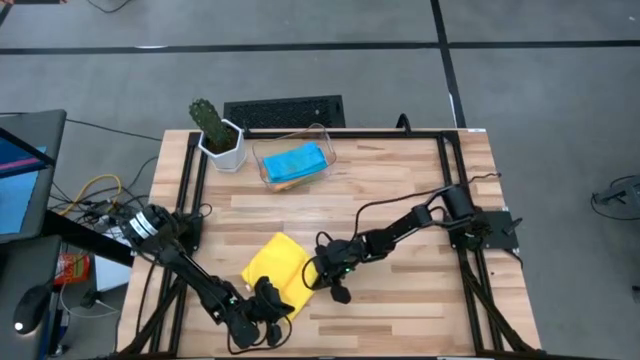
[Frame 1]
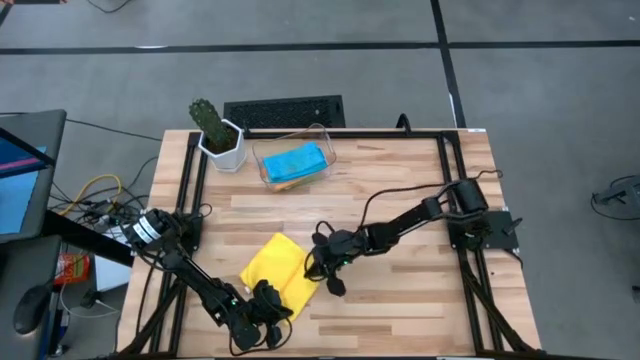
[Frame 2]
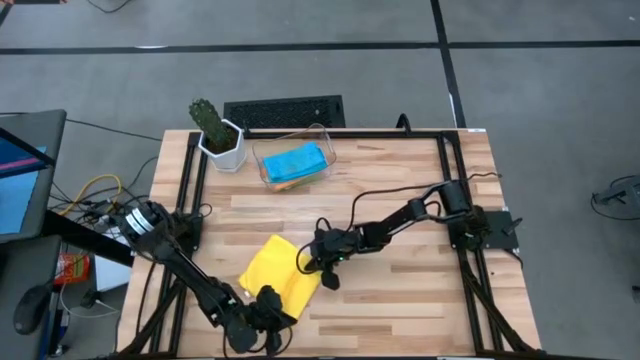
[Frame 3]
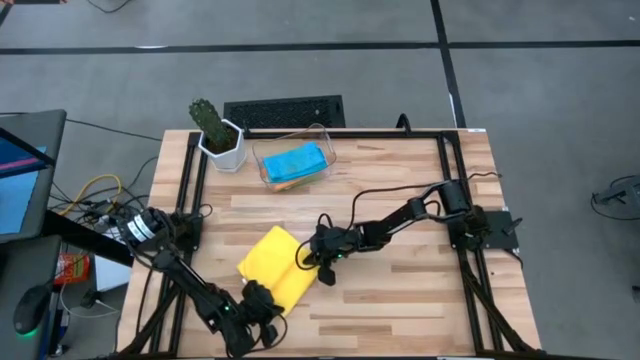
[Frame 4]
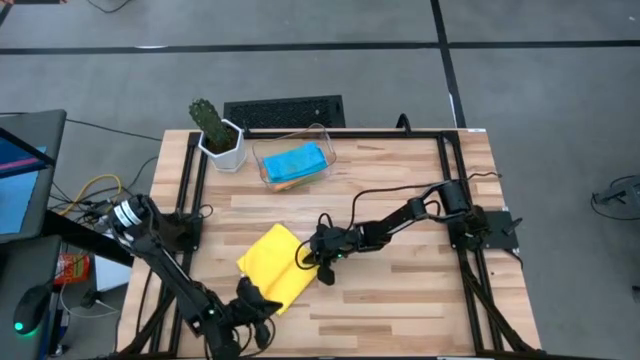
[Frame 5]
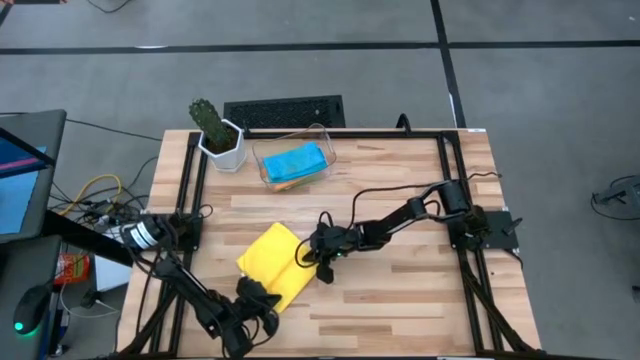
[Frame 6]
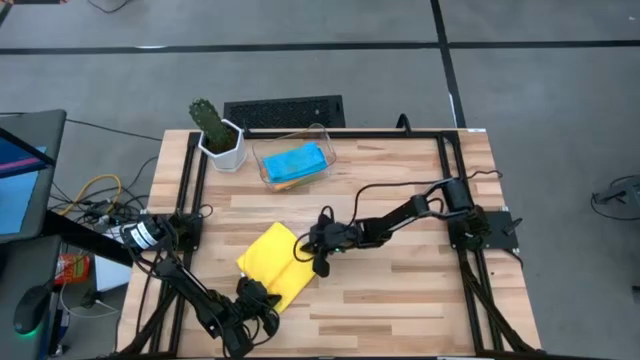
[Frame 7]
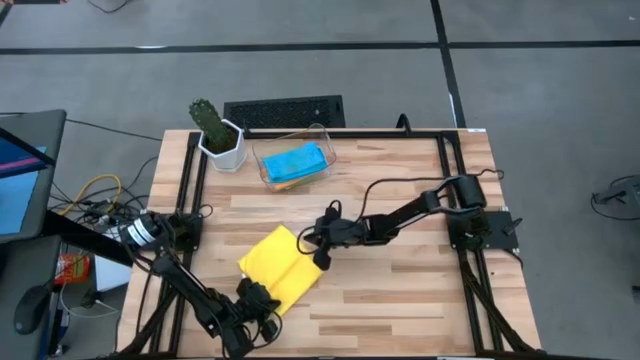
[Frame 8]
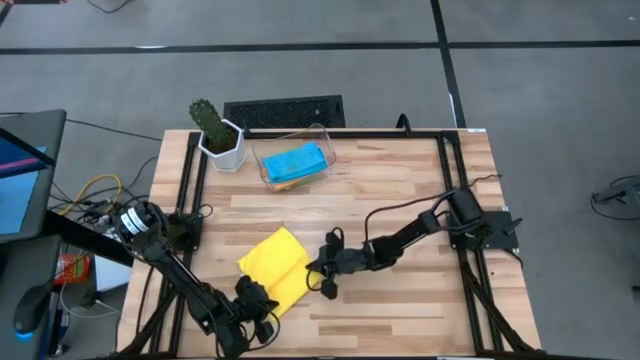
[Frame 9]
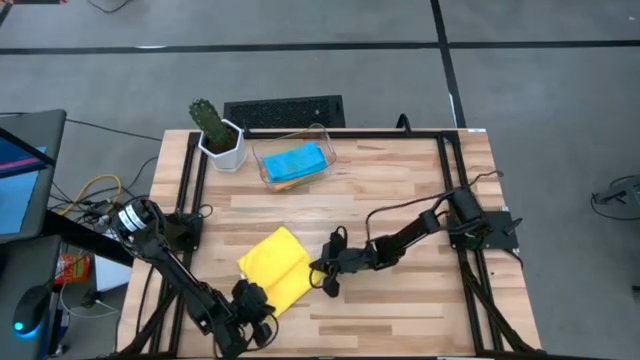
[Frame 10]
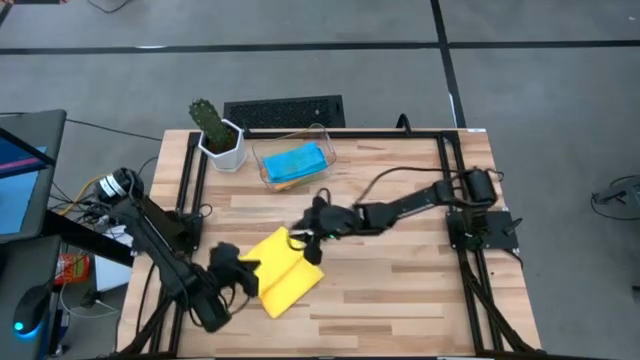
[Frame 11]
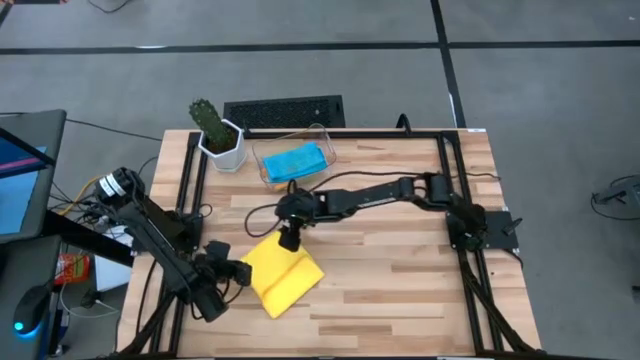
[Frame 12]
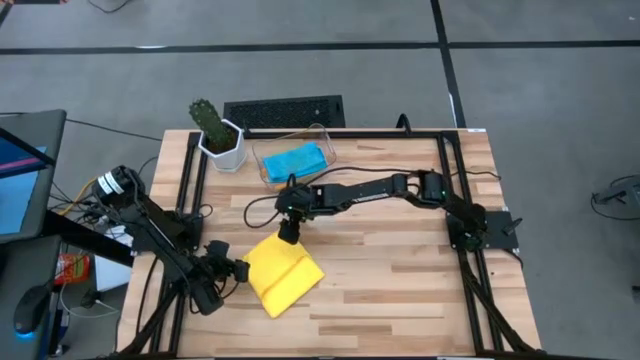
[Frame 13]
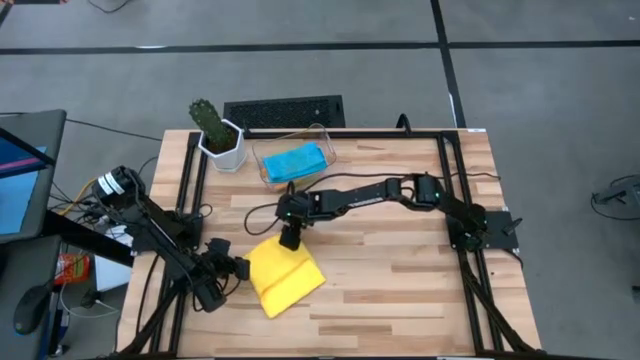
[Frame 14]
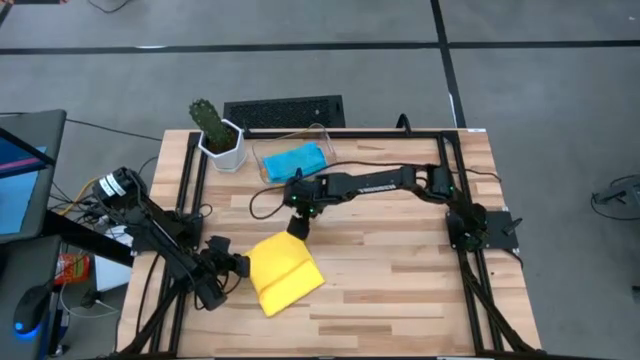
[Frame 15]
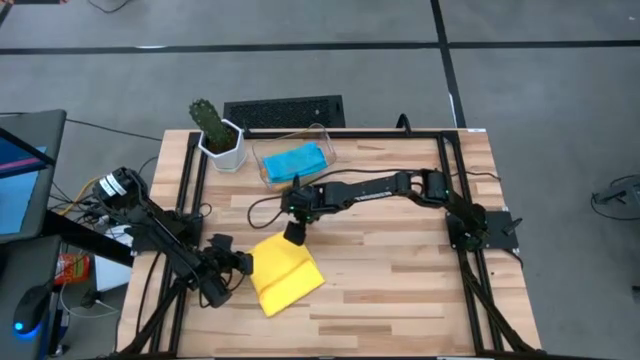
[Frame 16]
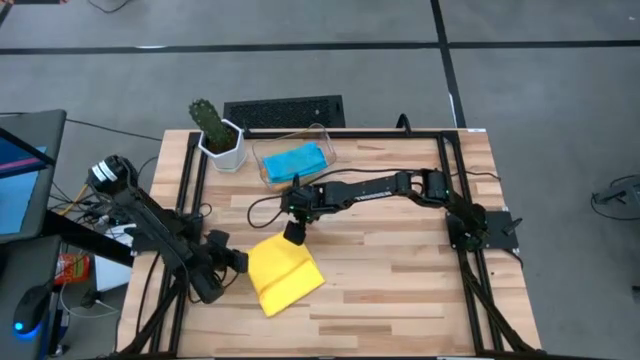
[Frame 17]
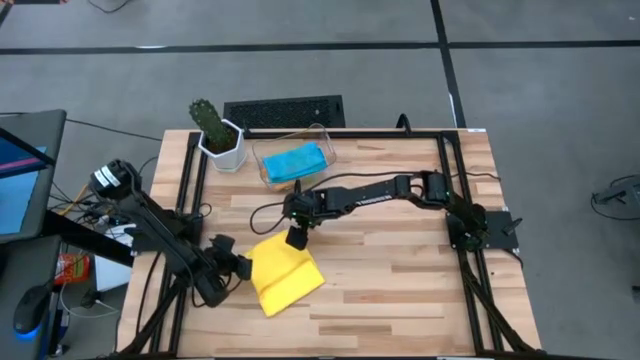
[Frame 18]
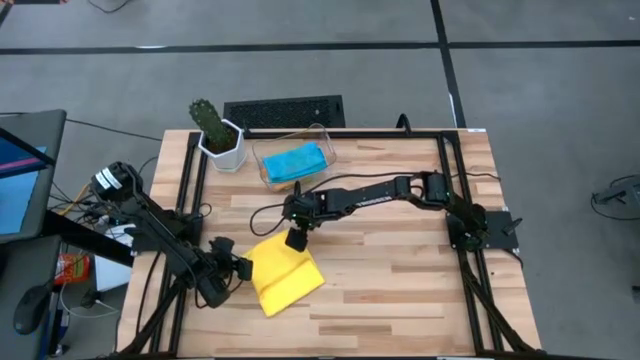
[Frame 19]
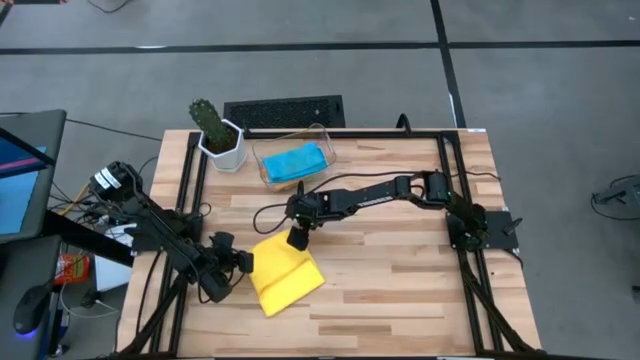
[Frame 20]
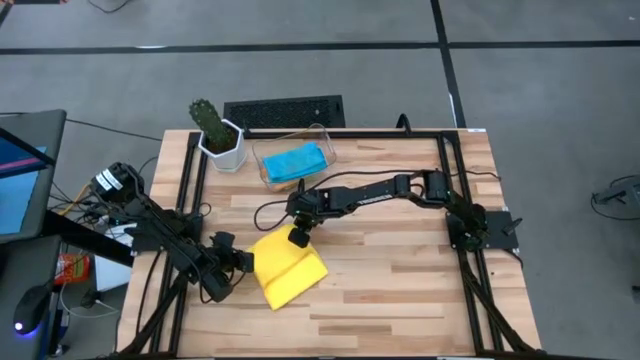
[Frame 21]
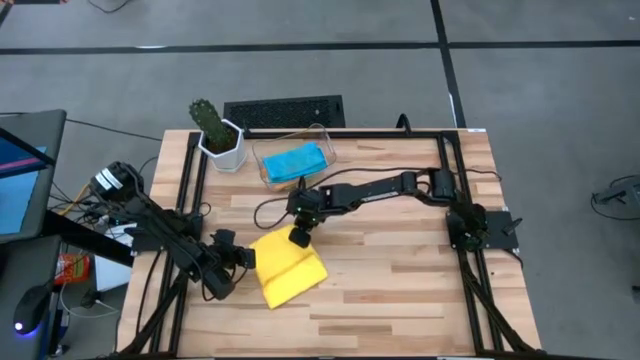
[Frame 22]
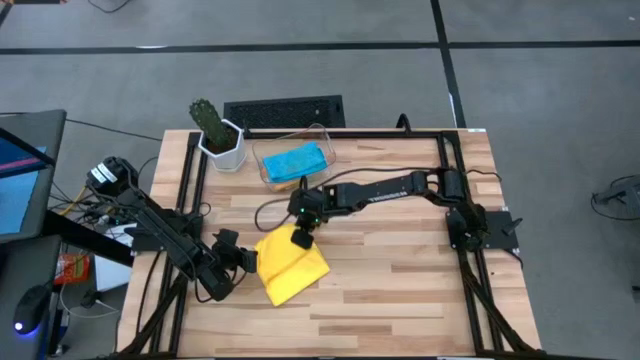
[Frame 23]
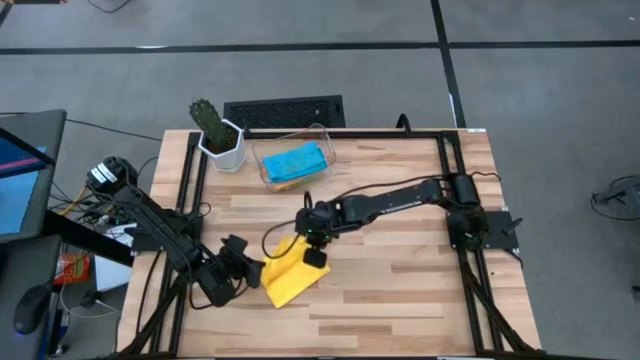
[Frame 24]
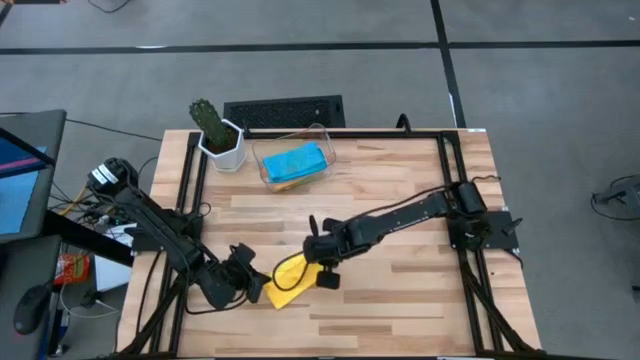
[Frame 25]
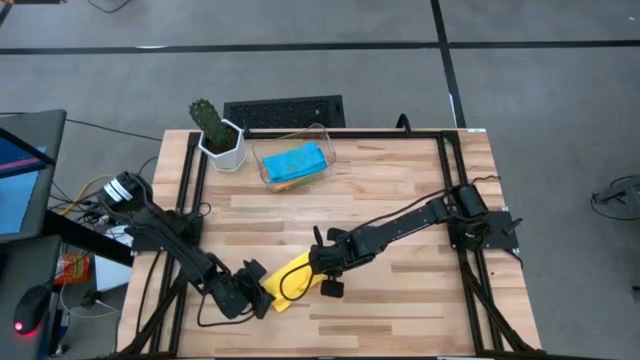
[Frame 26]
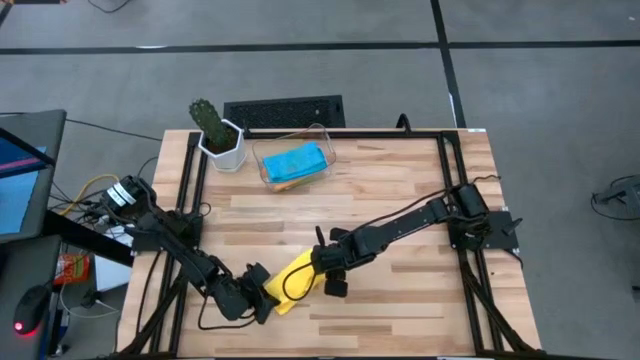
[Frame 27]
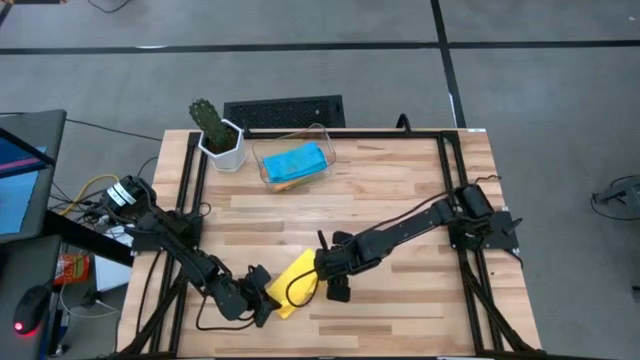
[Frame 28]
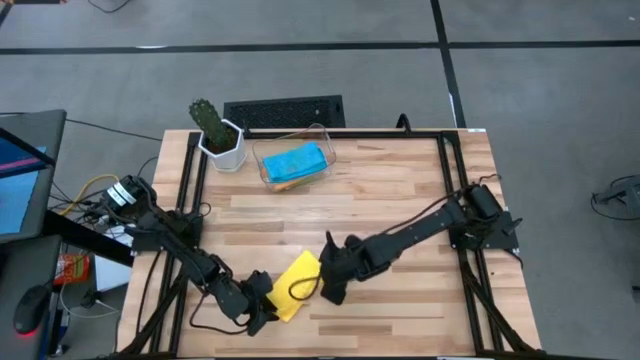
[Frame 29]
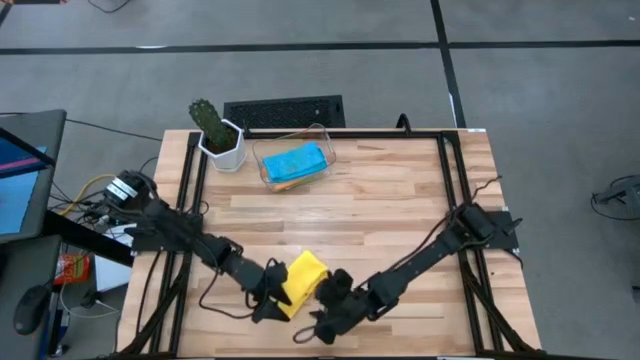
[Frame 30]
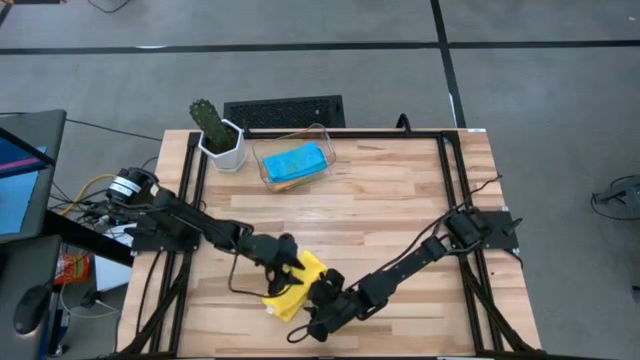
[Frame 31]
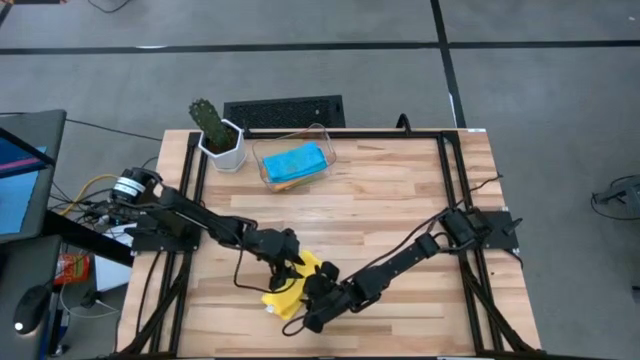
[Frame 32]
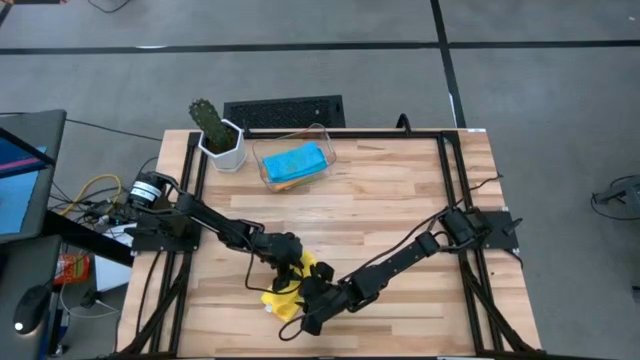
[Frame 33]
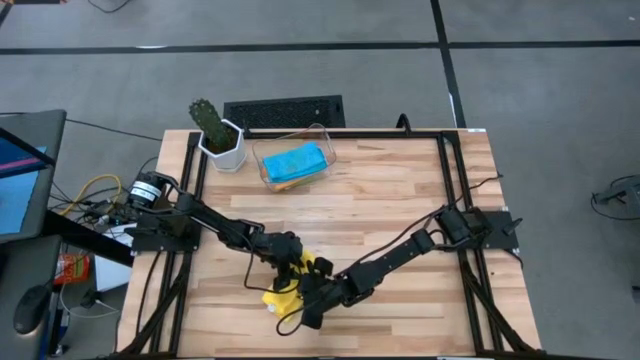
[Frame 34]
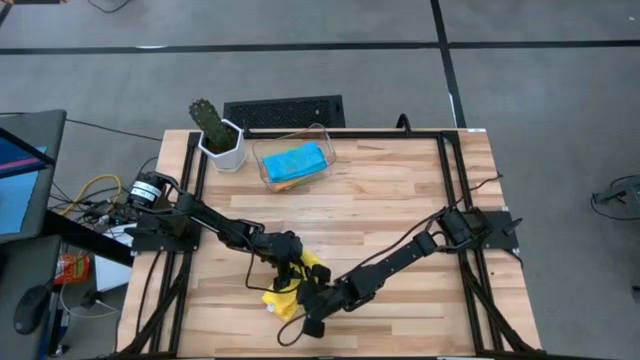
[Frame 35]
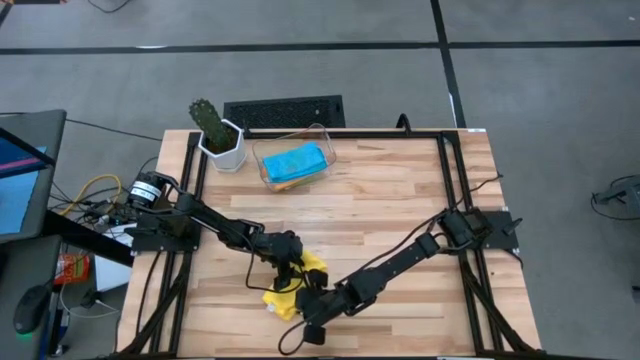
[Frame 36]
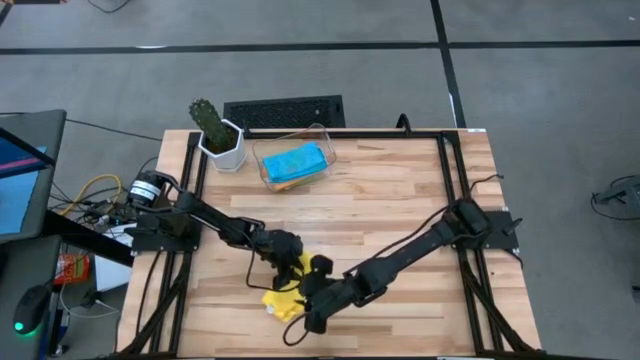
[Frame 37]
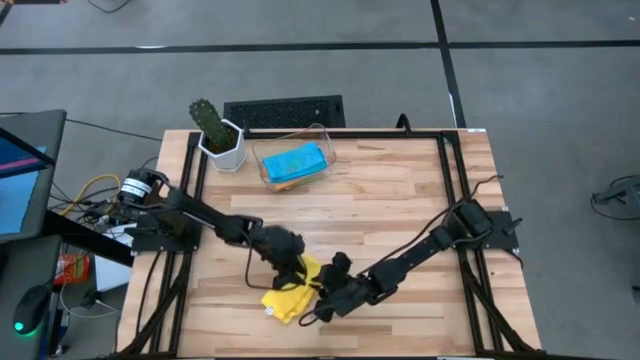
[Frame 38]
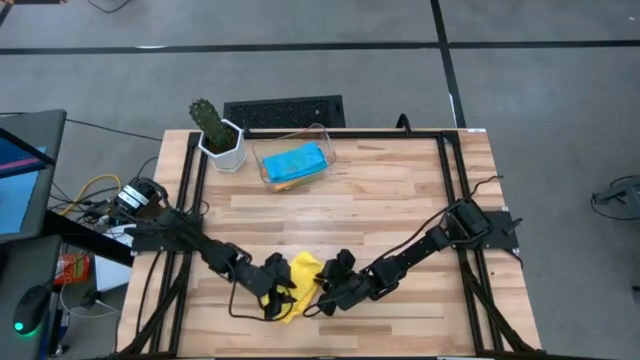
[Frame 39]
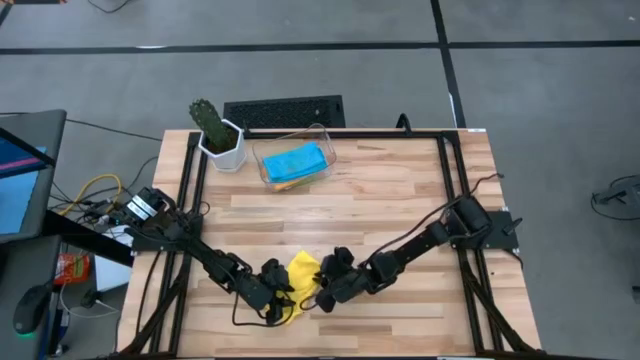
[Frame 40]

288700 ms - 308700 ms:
Task: Fold microfiber towels
Fold the yellow microfiber cloth

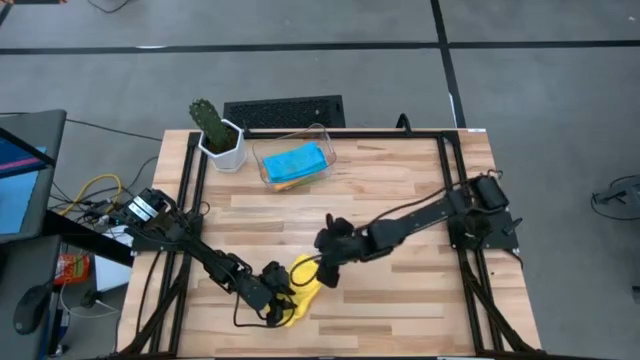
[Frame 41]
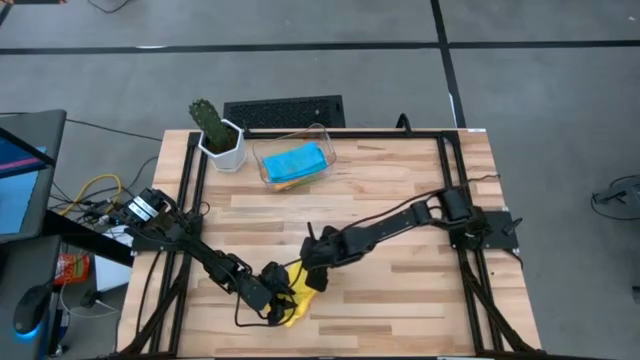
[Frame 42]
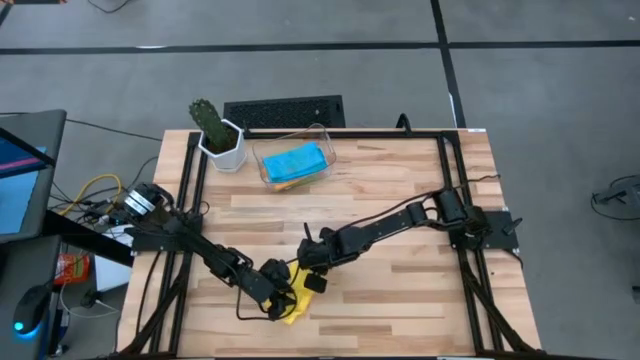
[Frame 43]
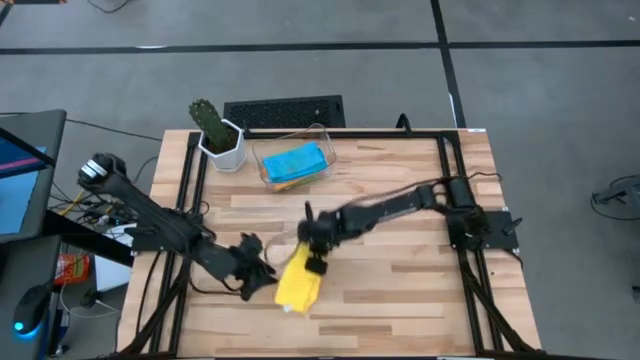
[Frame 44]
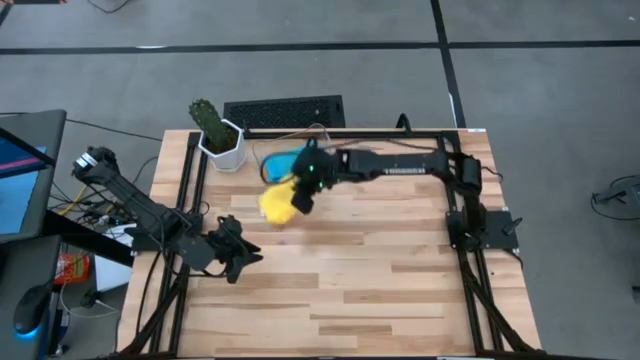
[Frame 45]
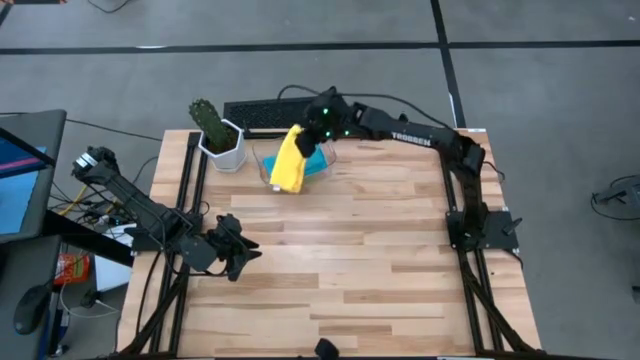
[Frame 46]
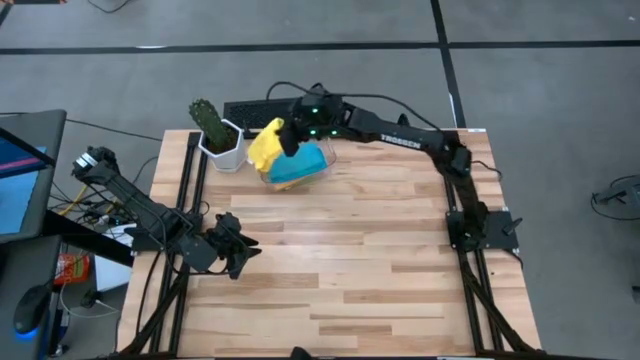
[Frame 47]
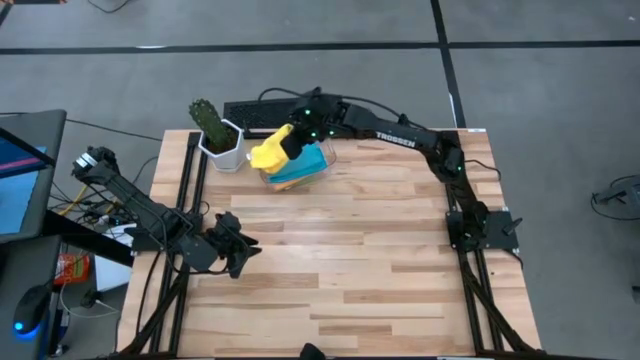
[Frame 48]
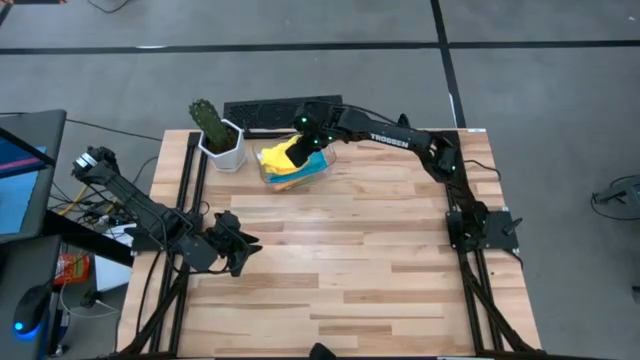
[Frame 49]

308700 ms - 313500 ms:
Put the yellow microfiber cloth into the transparent bin
